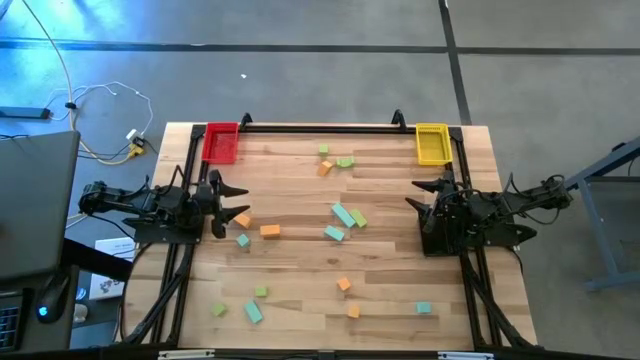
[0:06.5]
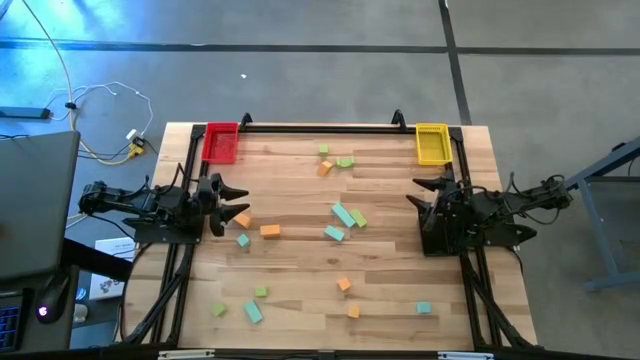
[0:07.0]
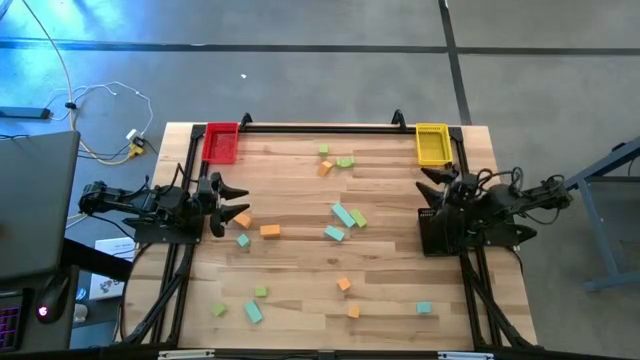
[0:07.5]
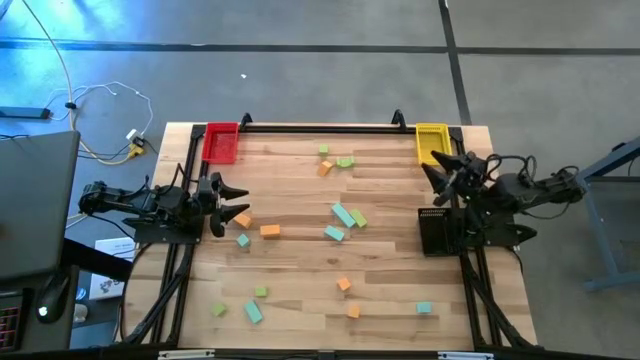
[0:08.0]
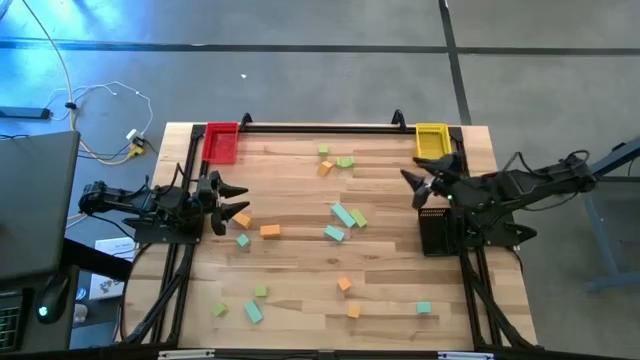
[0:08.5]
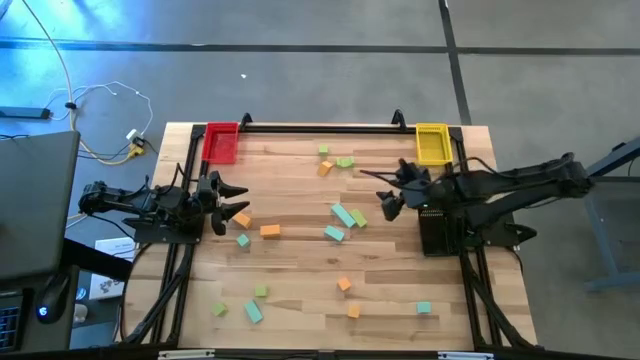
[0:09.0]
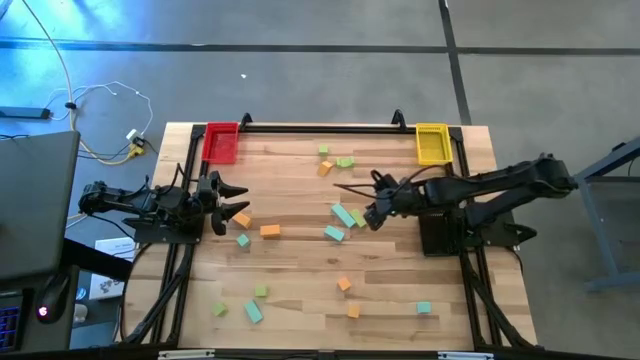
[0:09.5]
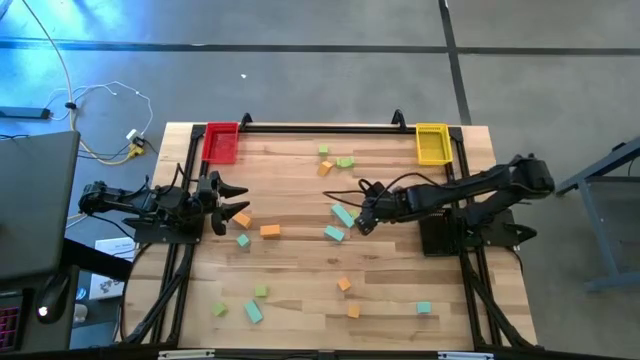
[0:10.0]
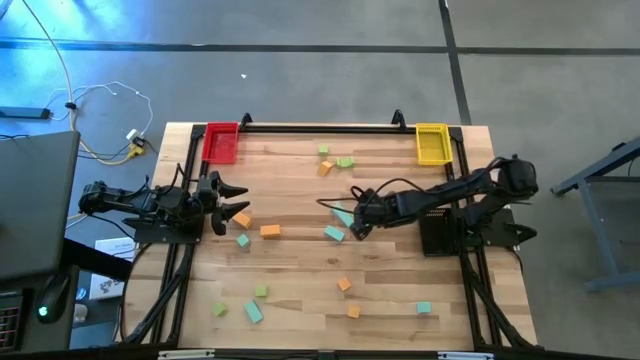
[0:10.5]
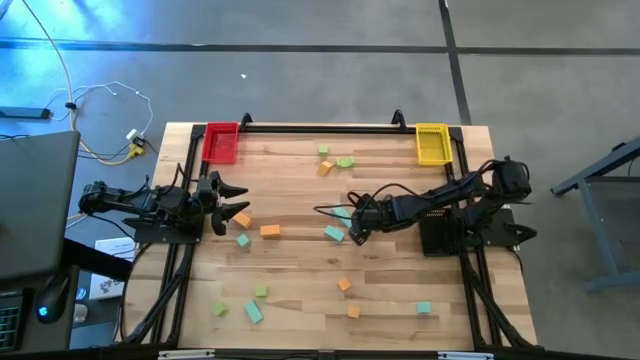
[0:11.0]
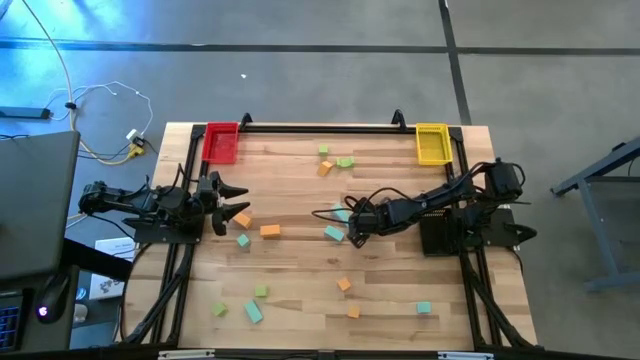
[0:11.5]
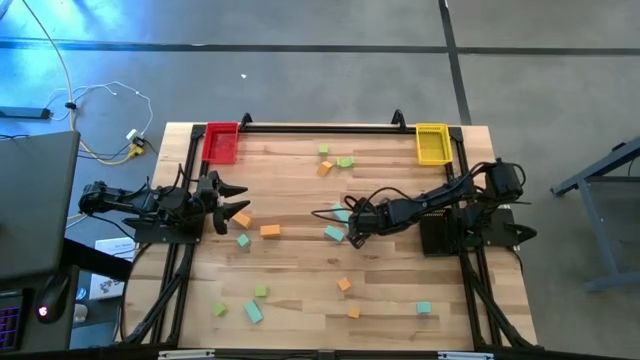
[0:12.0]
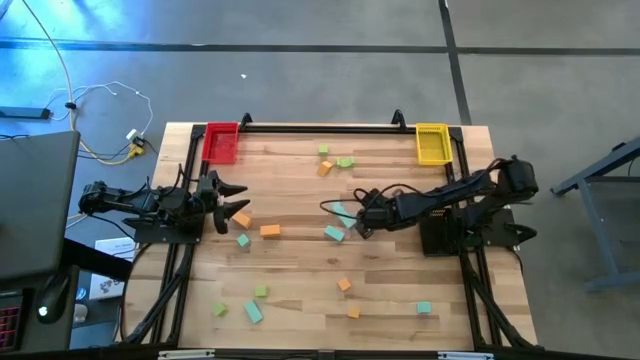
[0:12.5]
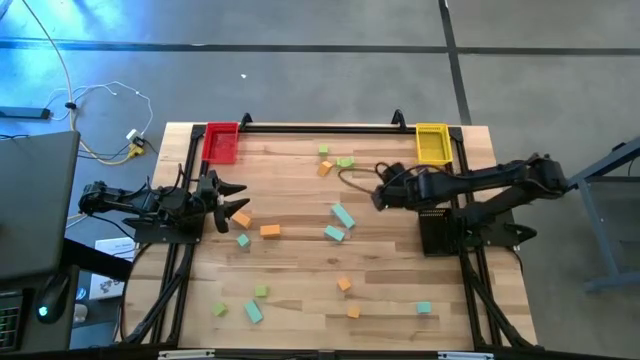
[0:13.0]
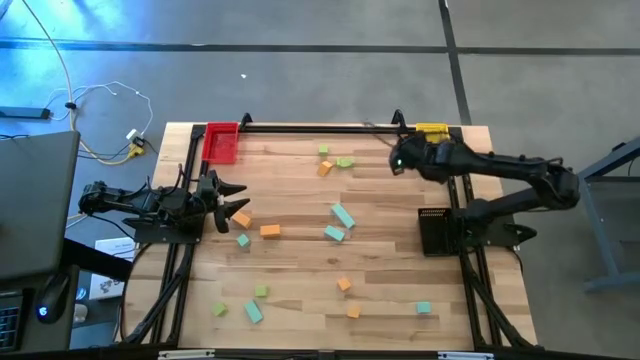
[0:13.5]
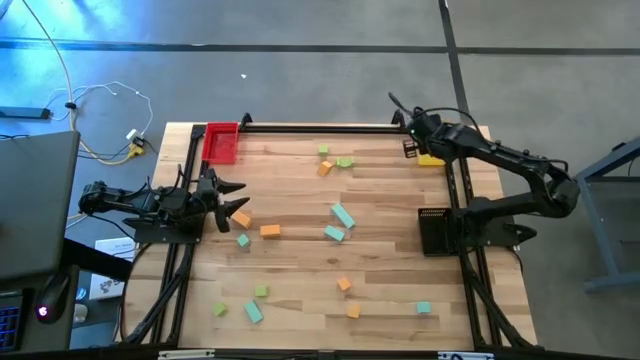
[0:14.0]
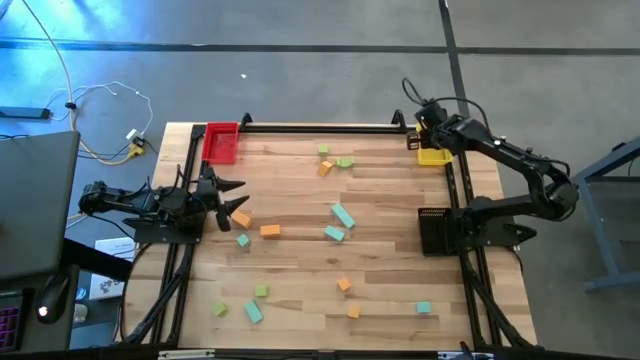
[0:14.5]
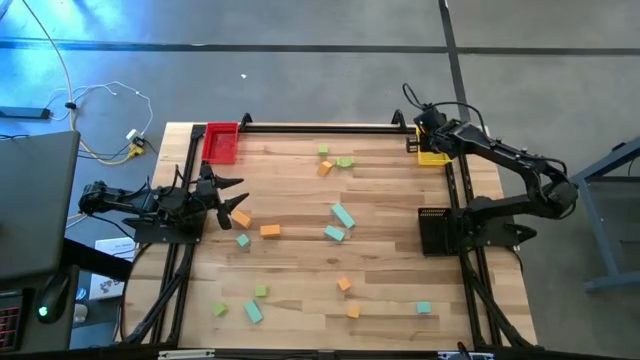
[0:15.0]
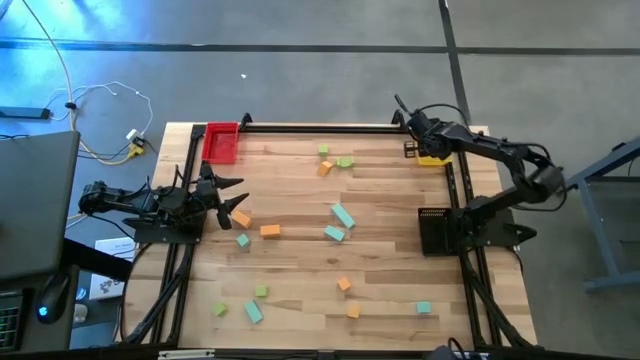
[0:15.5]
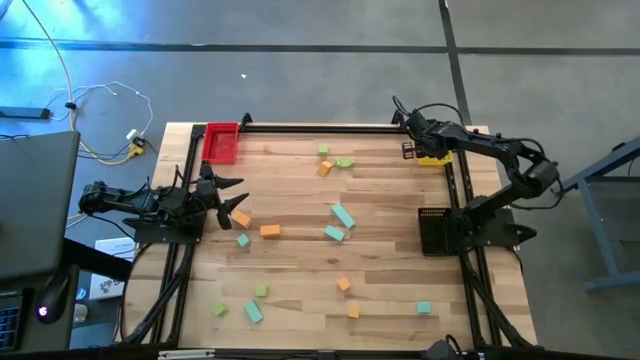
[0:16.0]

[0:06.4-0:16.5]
Task: Sort & place blocks by color
Put the green block into the yellow bin

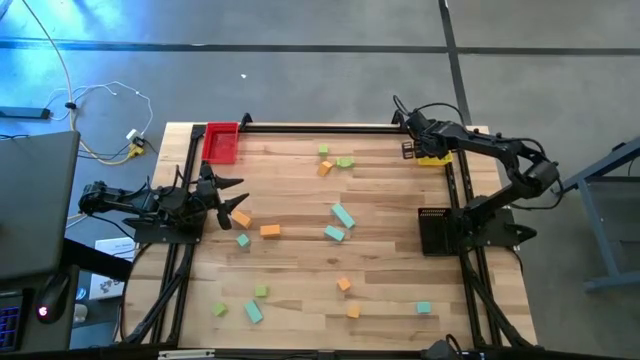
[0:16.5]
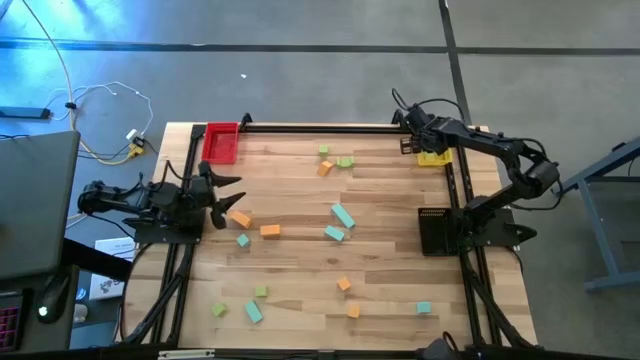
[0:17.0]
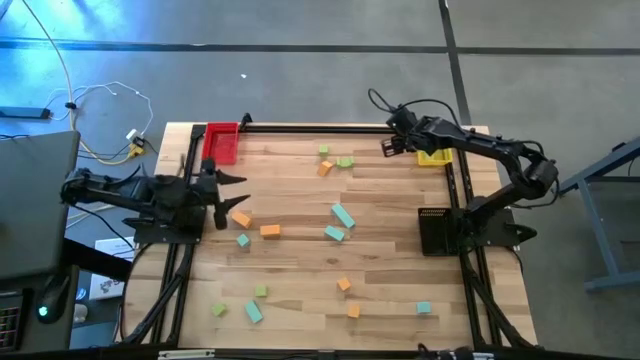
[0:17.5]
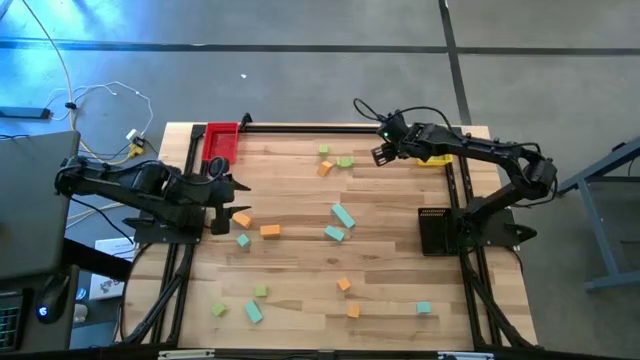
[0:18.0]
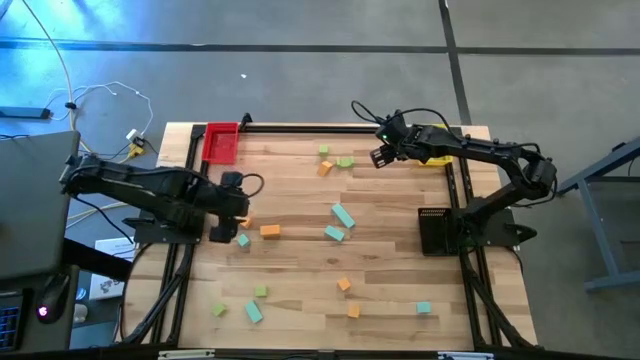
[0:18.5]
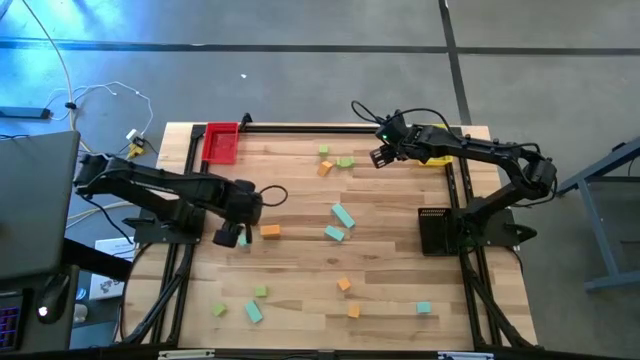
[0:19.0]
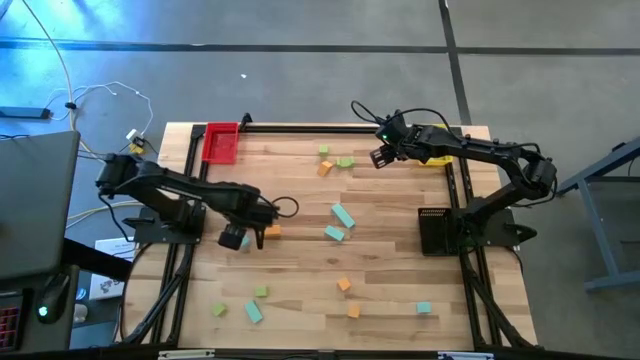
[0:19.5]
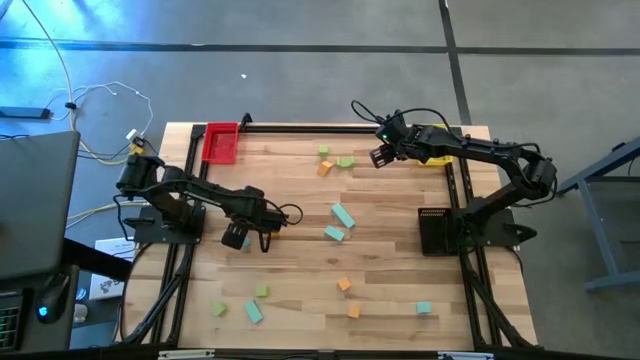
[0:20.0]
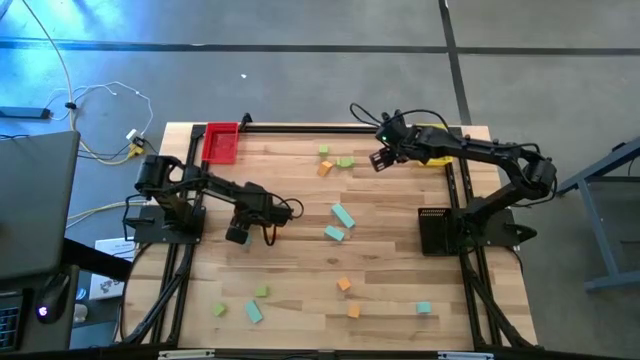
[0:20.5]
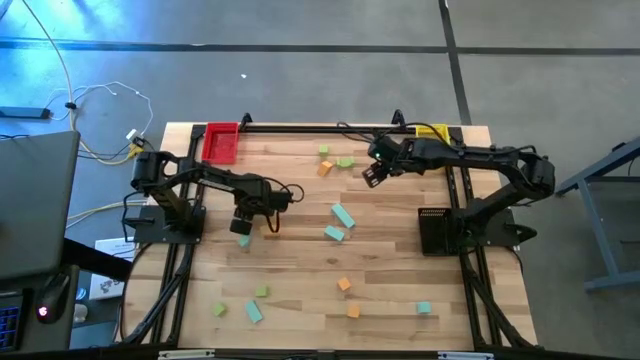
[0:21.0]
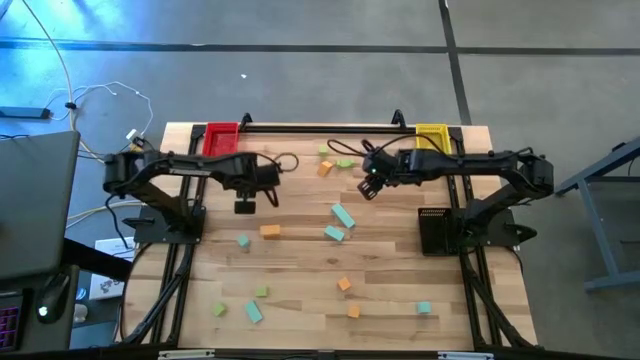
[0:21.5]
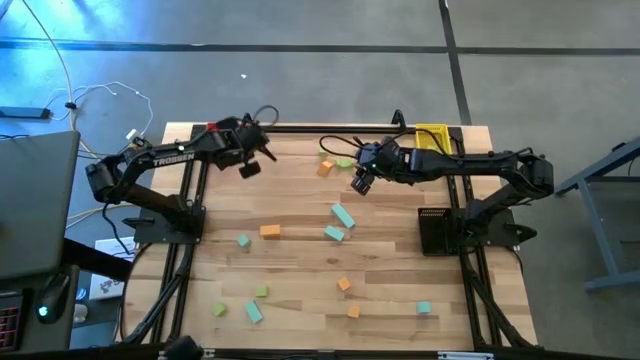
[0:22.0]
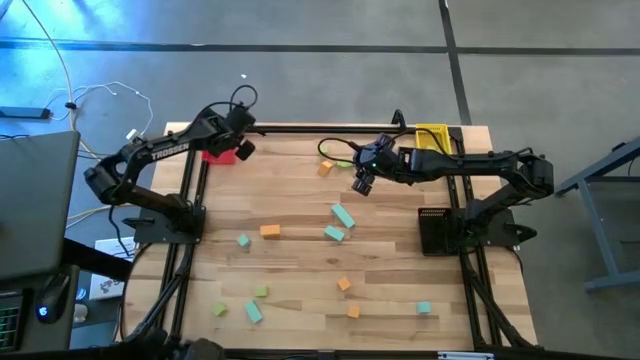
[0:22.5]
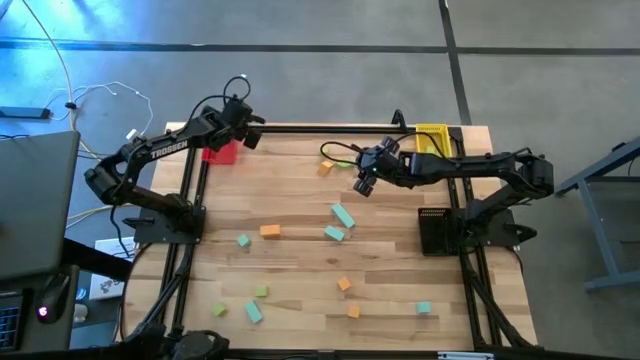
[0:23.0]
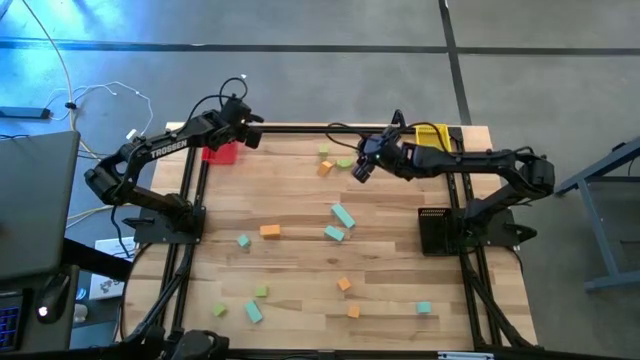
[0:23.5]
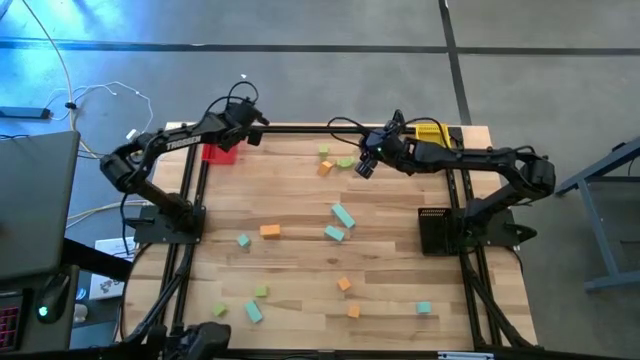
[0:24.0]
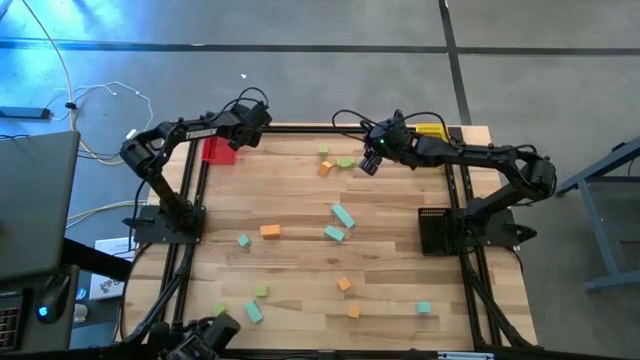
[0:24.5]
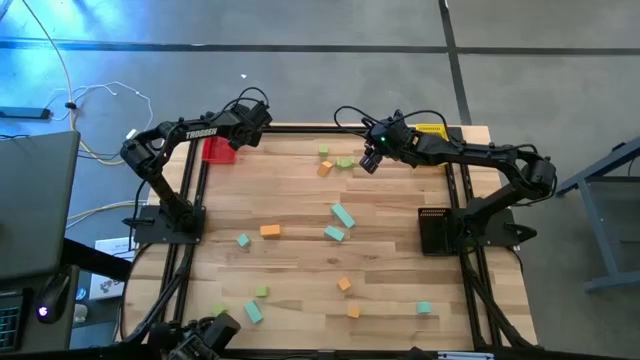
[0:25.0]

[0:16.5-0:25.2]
Put the yellow block into the red bin

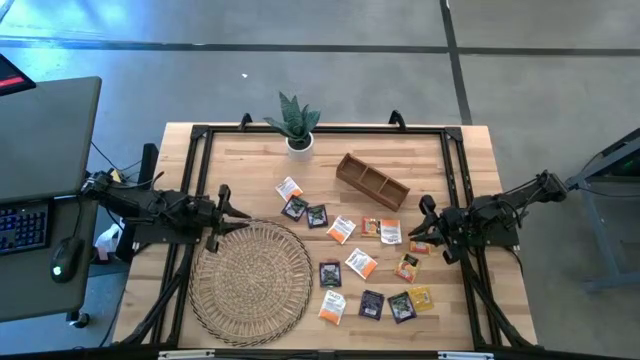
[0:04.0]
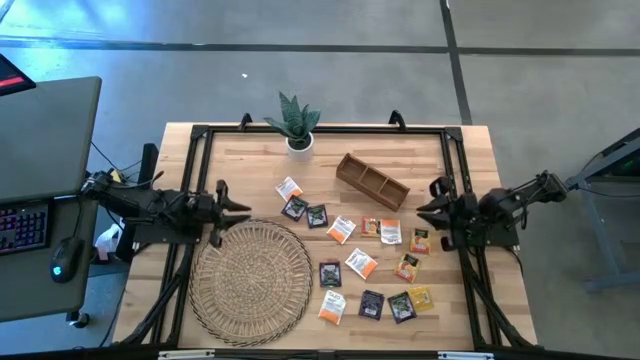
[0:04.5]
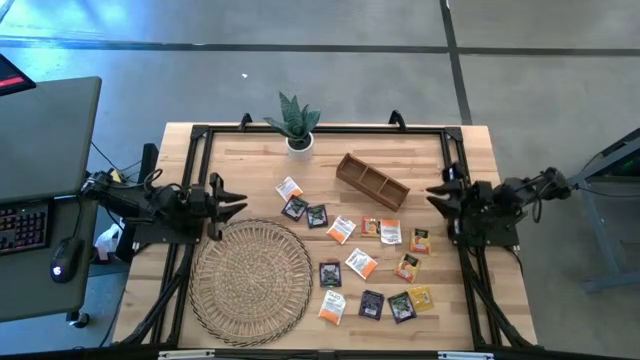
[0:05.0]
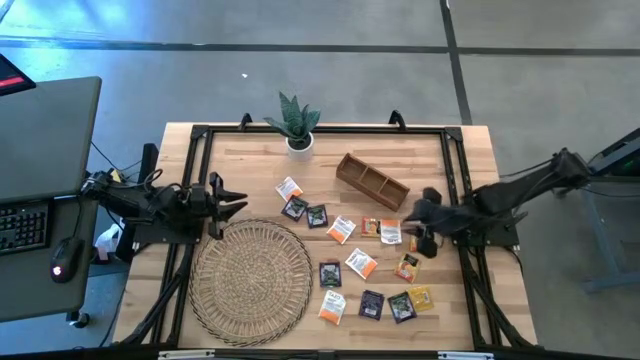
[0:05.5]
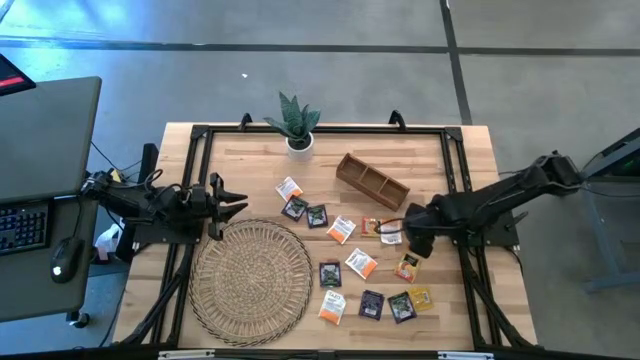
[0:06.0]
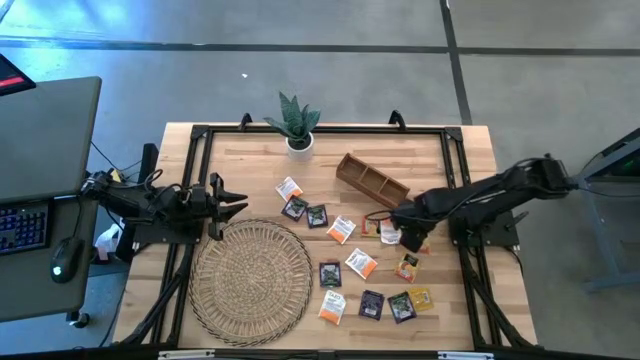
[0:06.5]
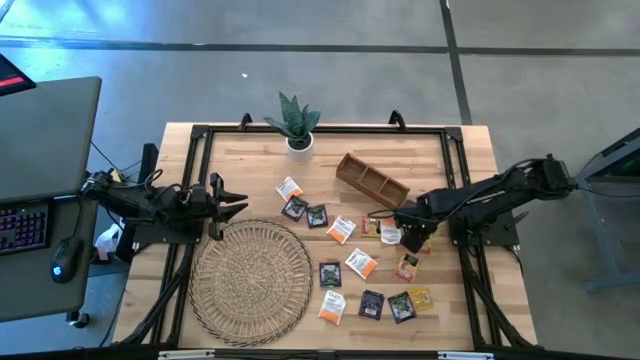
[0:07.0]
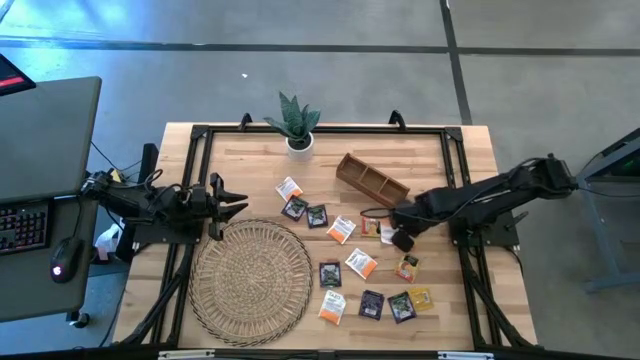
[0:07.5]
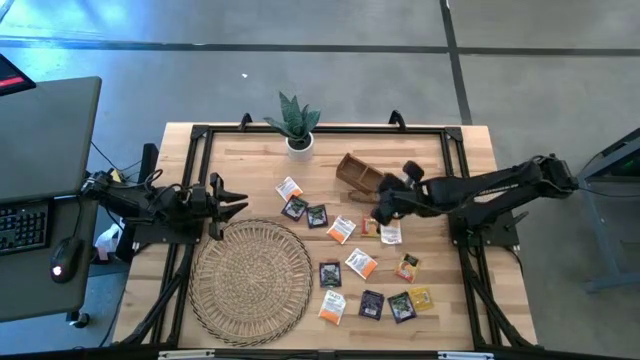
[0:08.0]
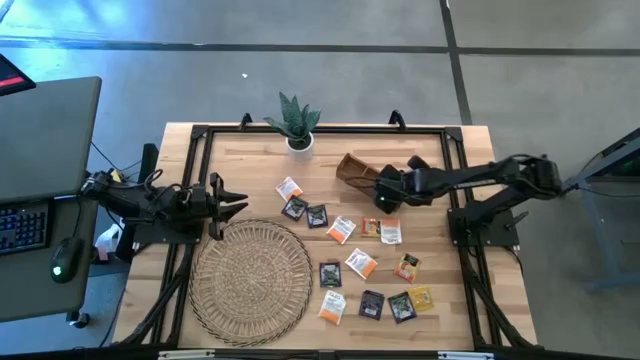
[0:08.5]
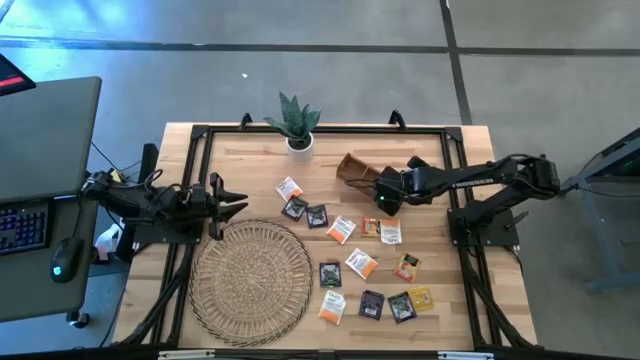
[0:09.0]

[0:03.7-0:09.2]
Task: Pick & Place Tea
Put the orange tea bag into the right section of the wooden organizer
